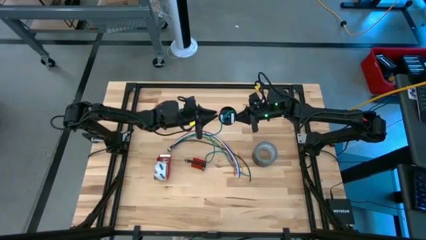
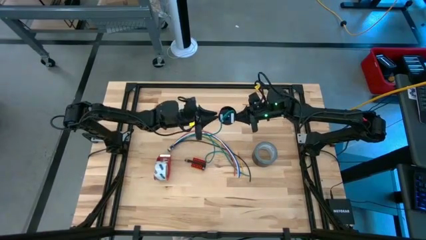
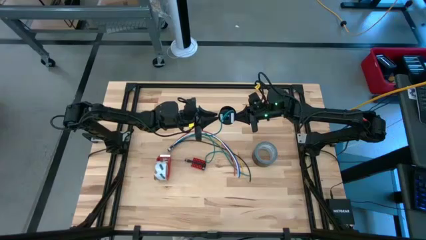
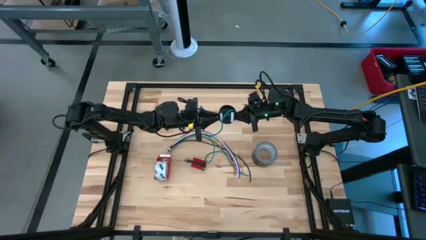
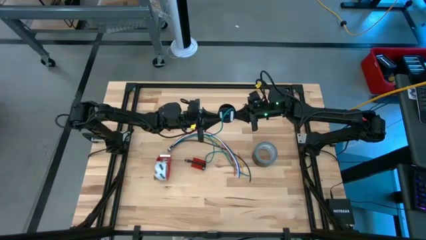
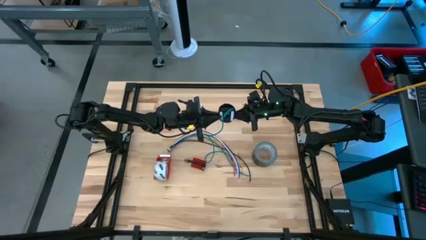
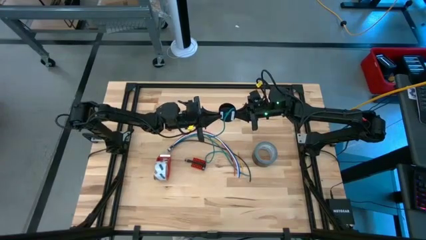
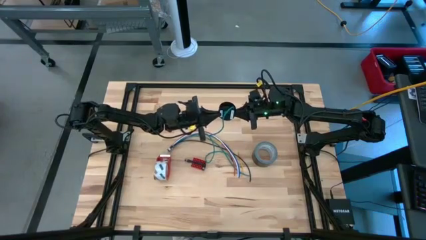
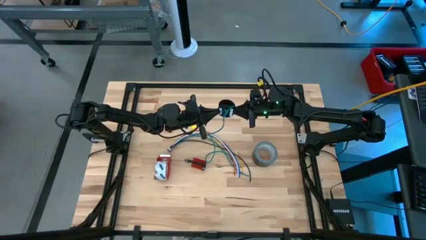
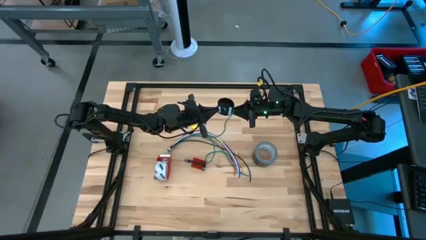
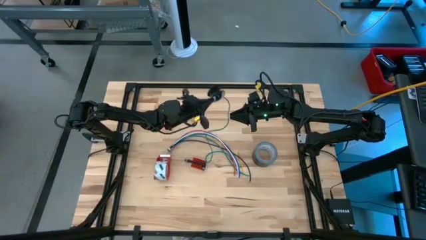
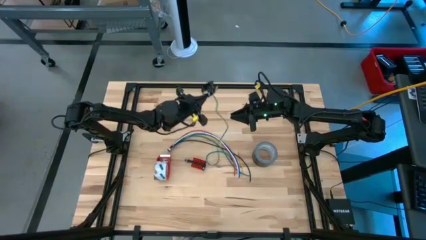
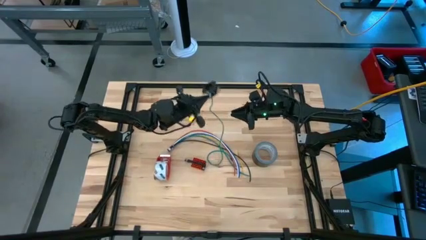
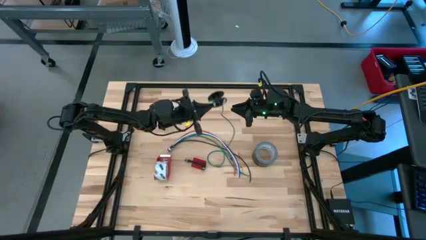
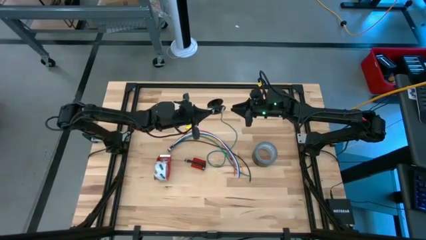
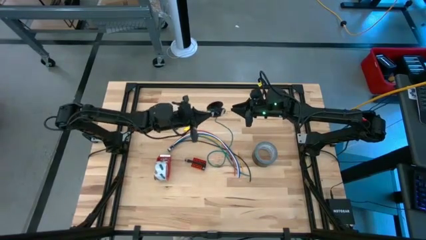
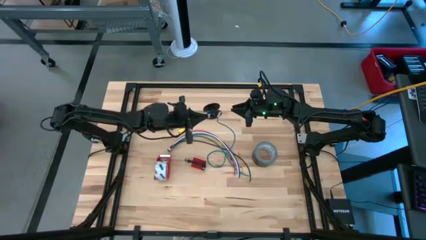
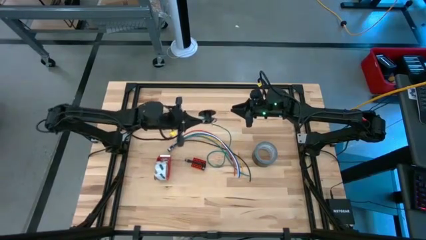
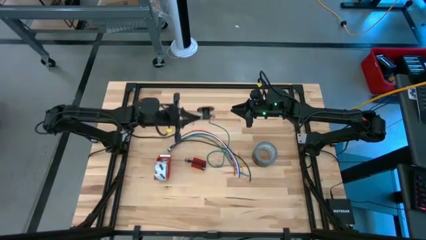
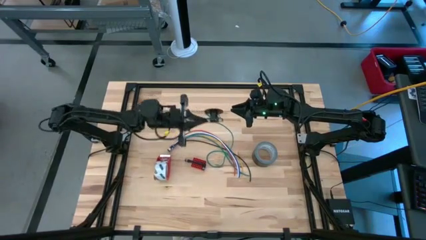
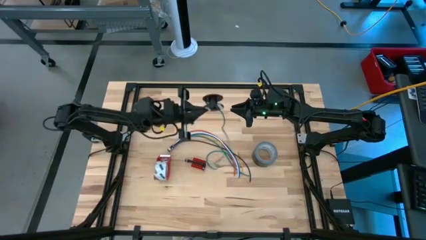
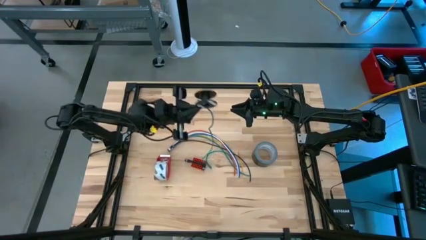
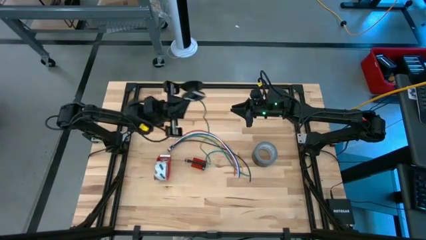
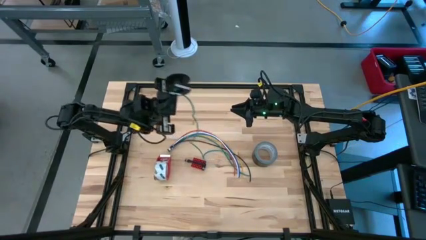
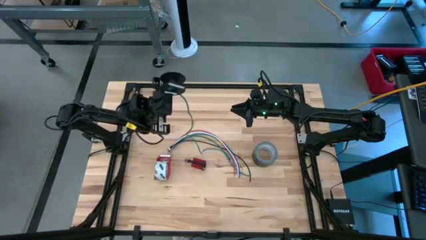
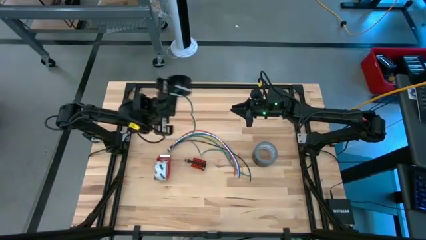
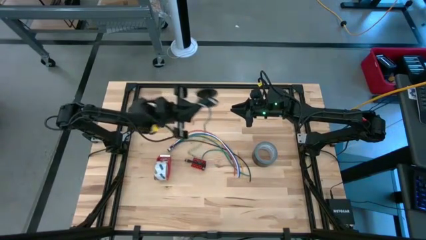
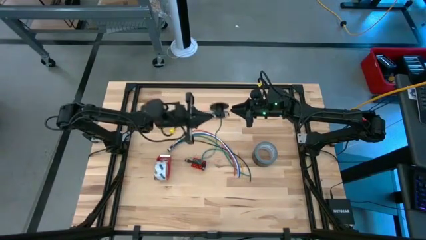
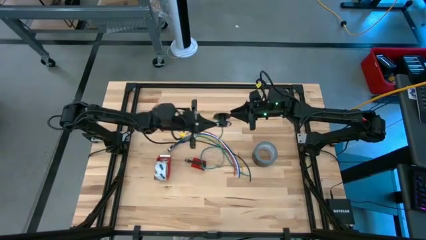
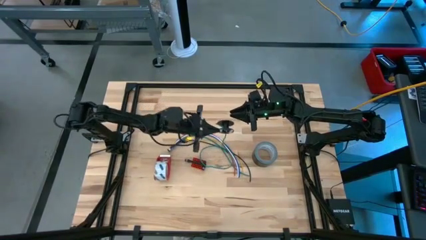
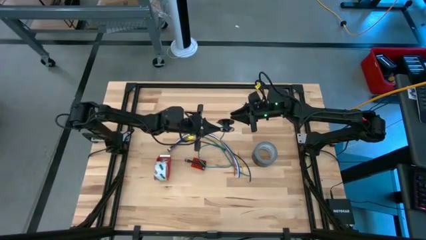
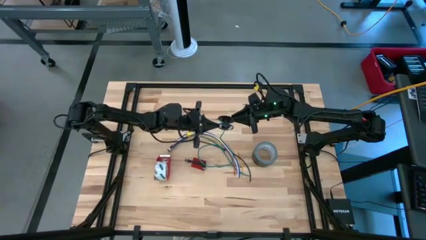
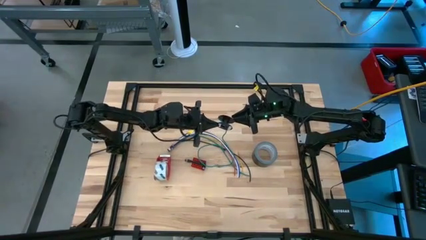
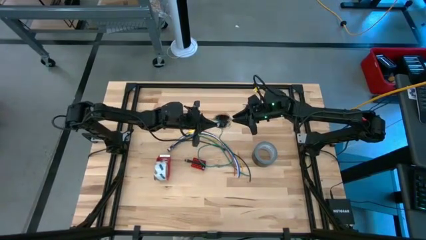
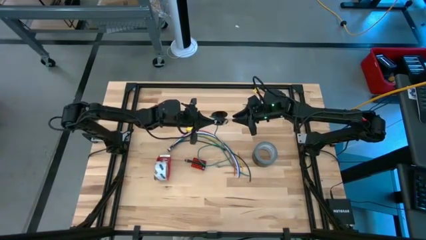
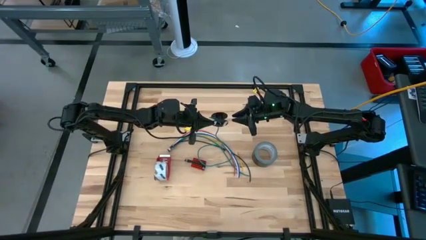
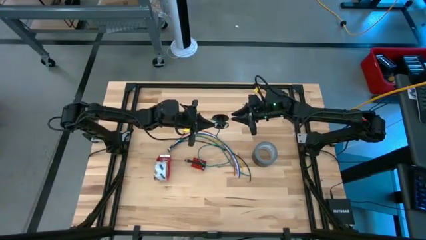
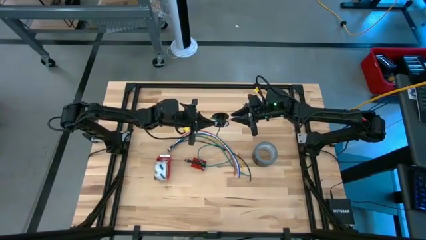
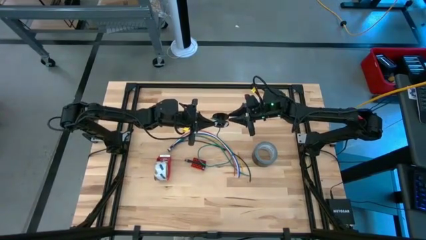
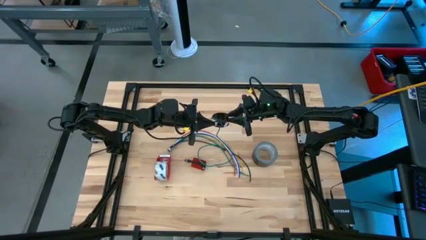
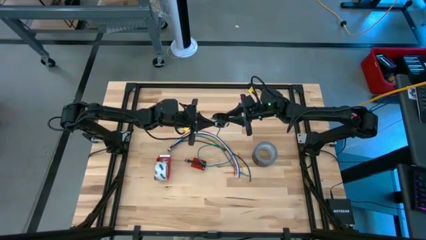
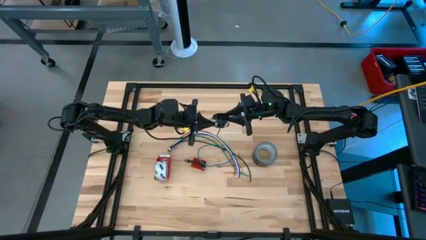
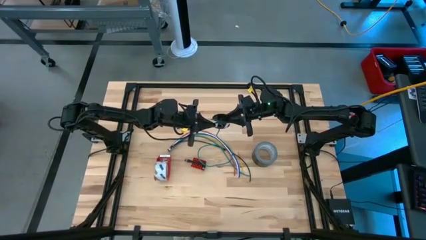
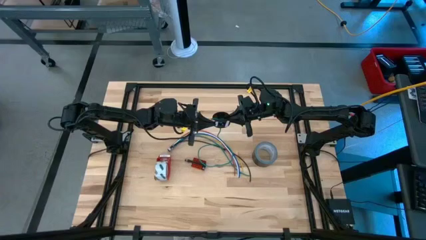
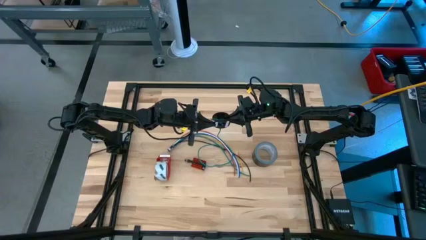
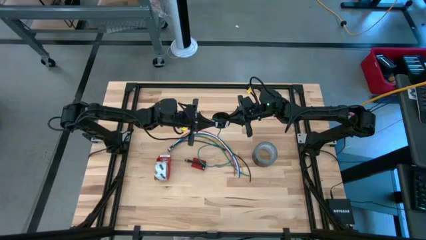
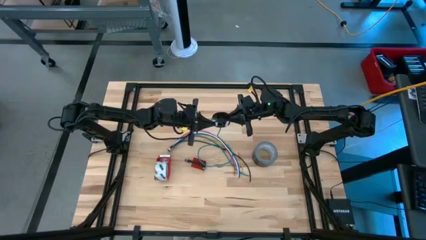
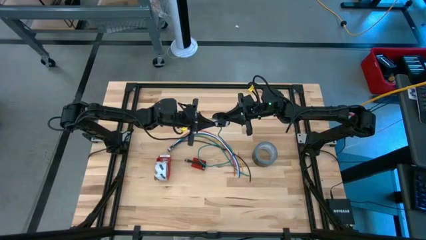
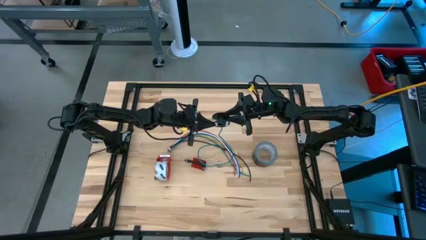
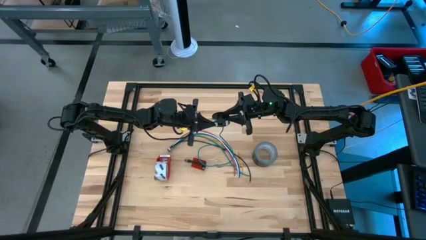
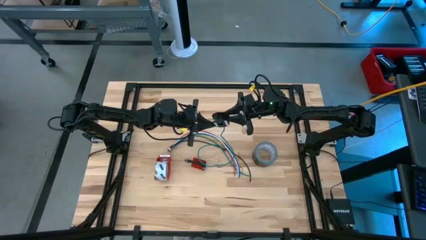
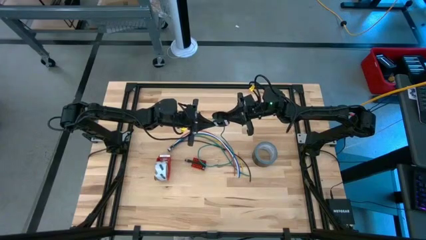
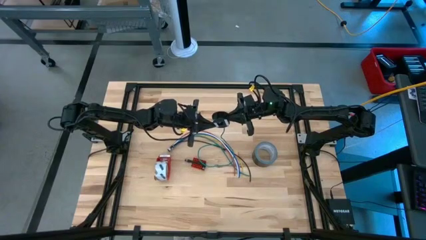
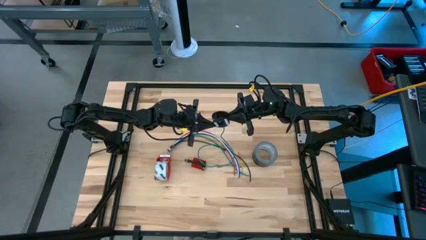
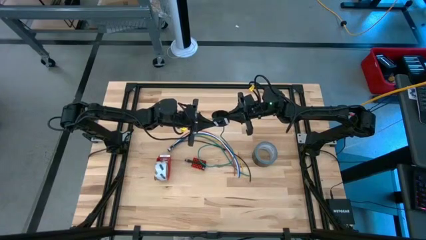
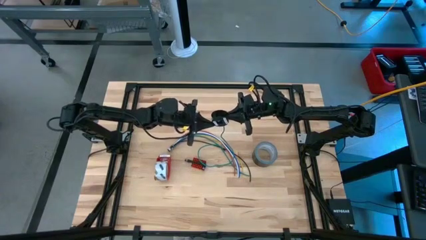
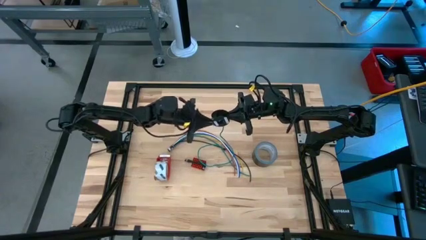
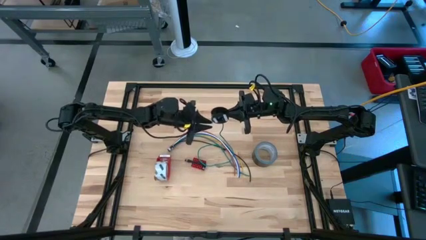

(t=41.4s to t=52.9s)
Task: Coil cords
Uncoil the green wire from the black spool

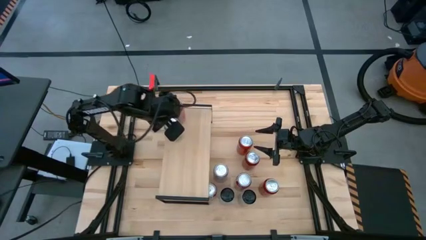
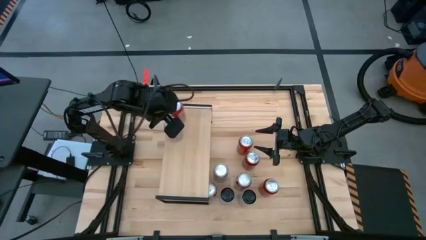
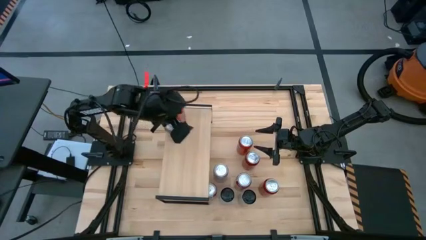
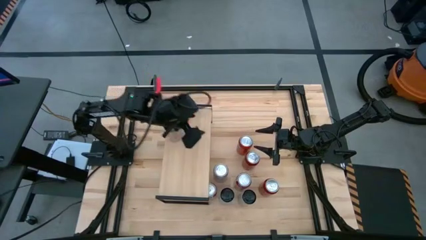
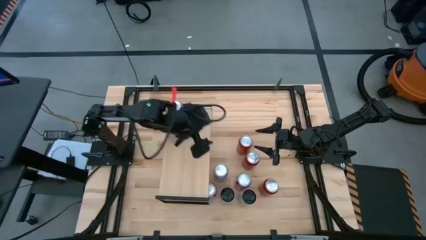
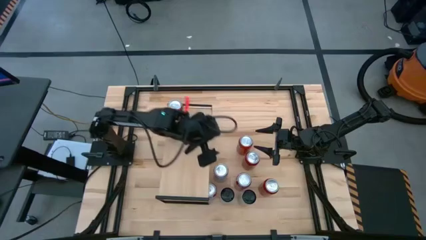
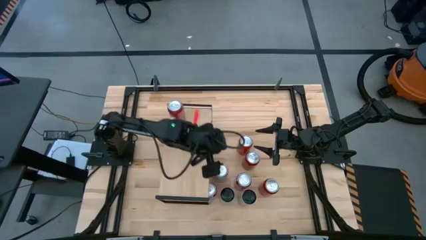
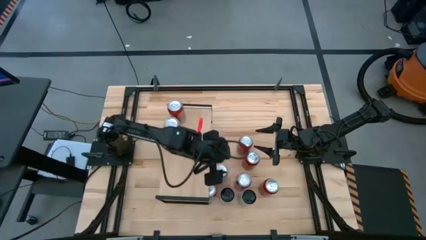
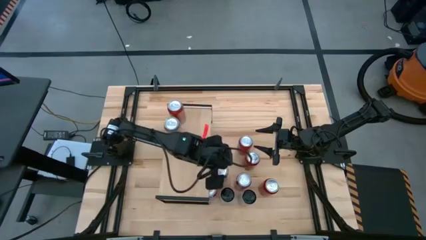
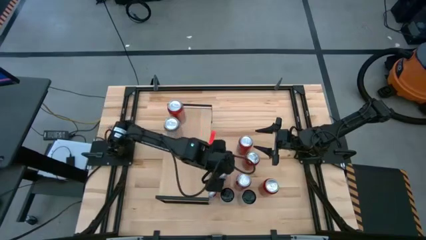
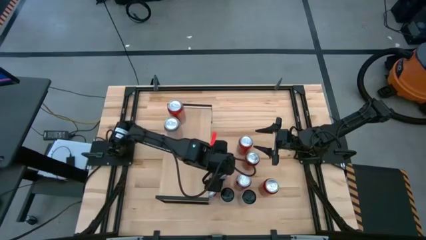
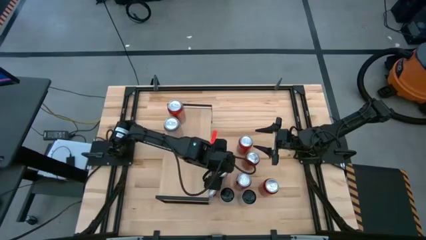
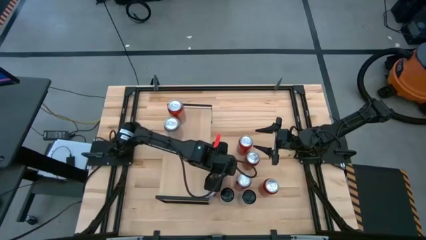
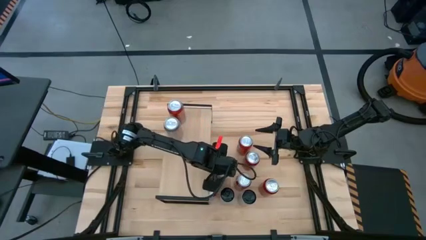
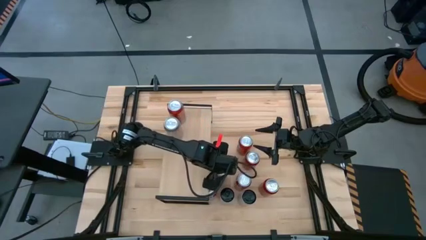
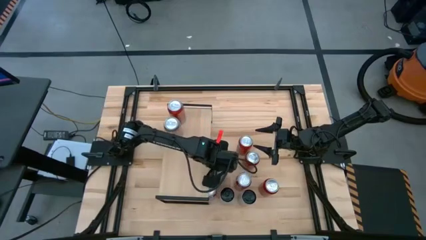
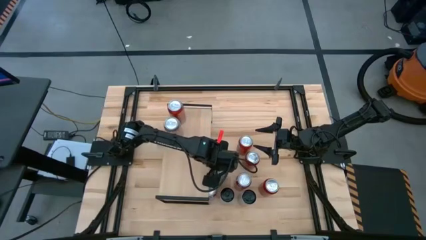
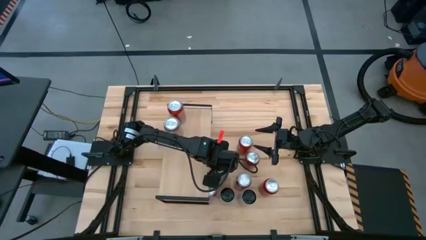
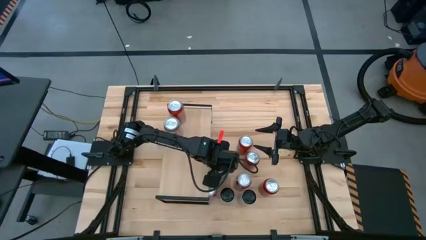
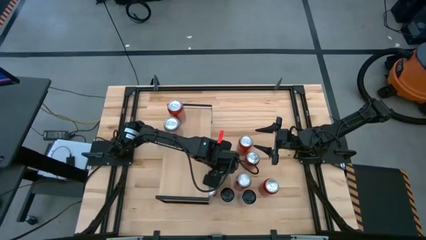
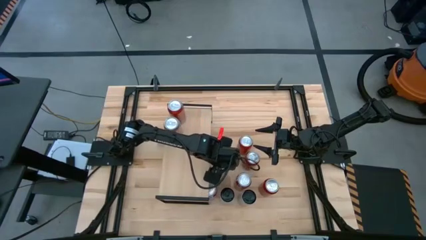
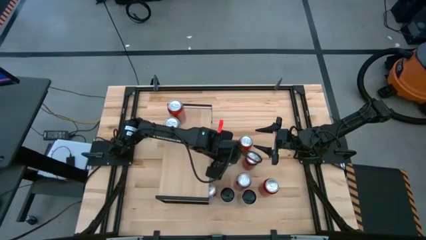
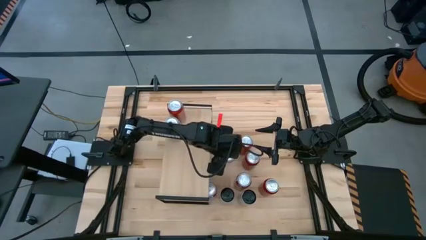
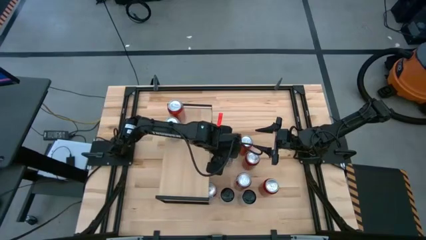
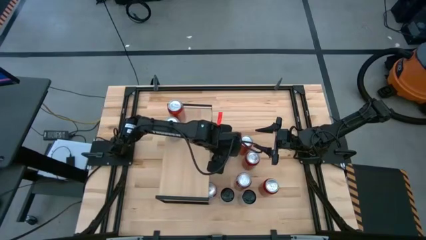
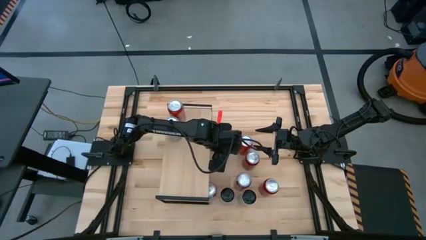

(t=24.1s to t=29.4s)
Task: Place canned beverage on shelf
Put the silver soda can on the shelf aligned with the other silver soda can
